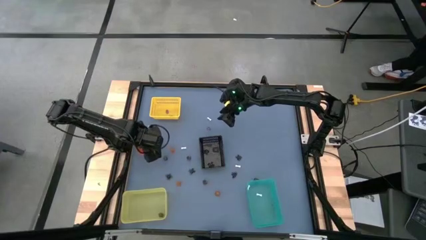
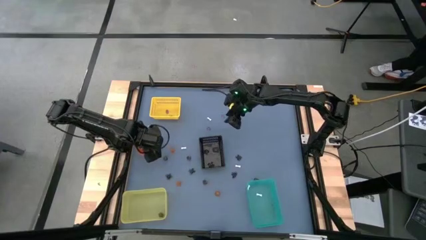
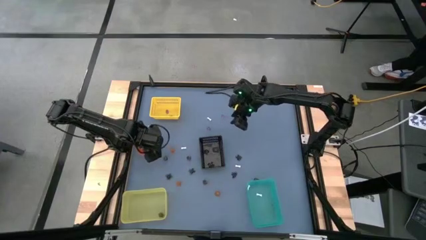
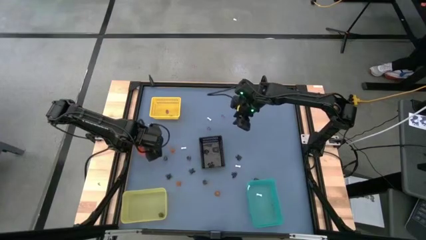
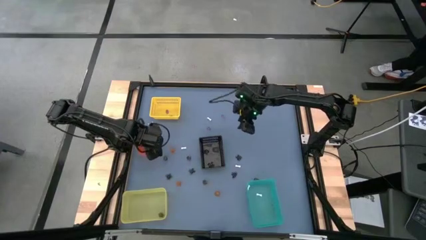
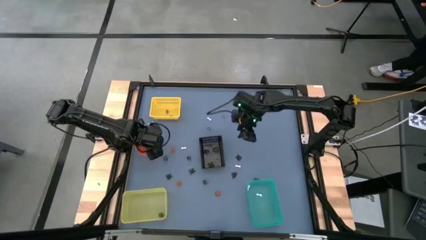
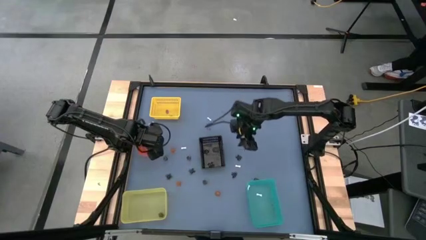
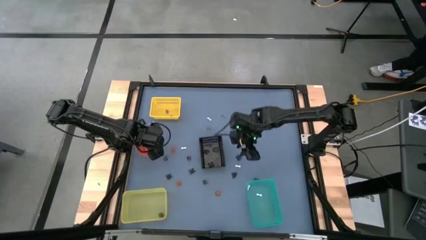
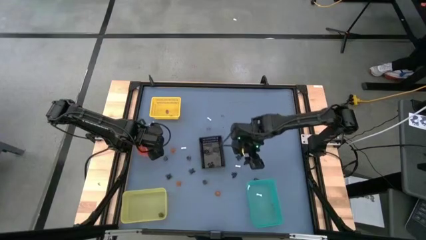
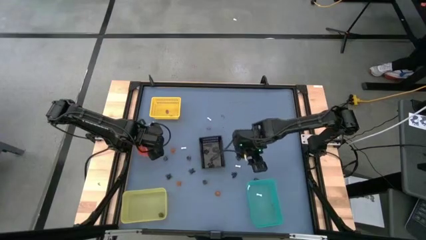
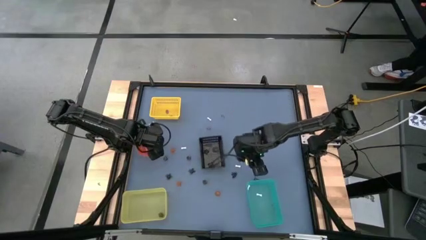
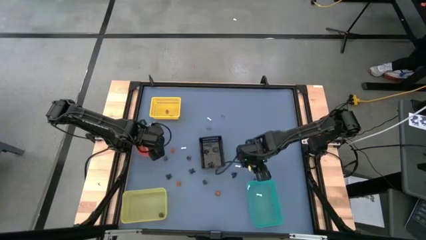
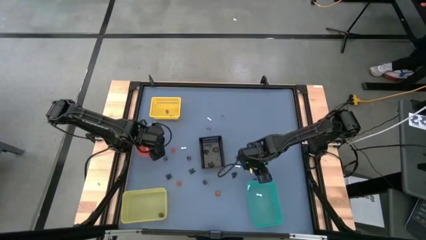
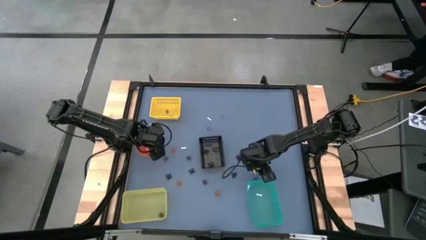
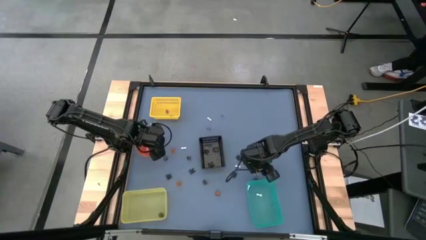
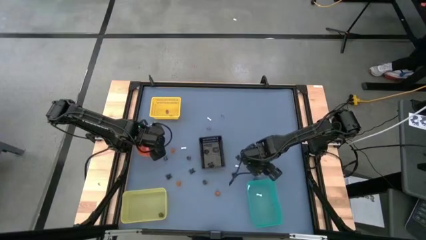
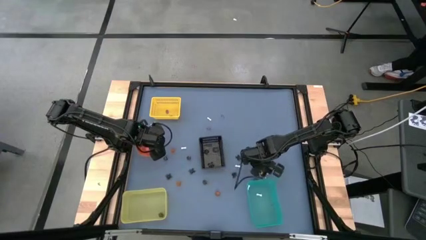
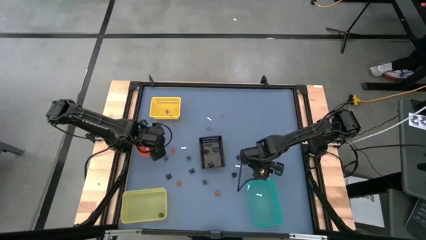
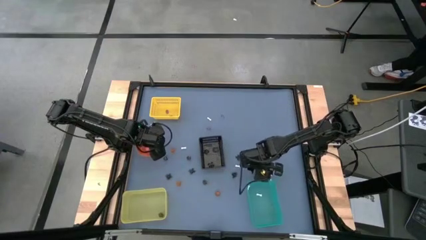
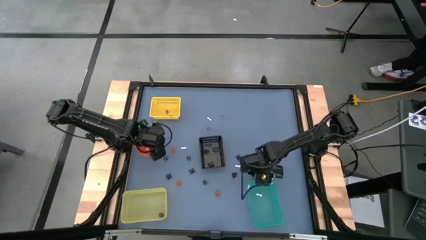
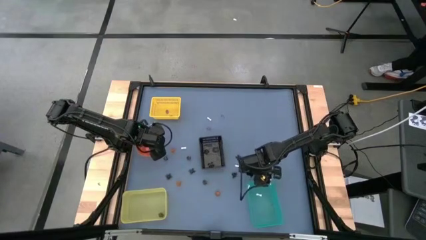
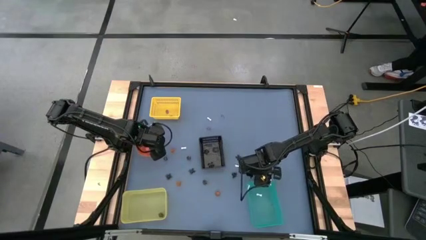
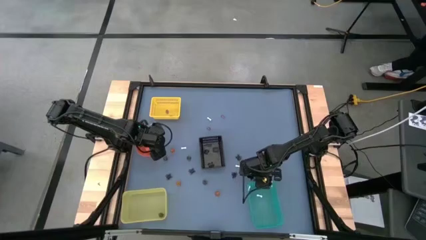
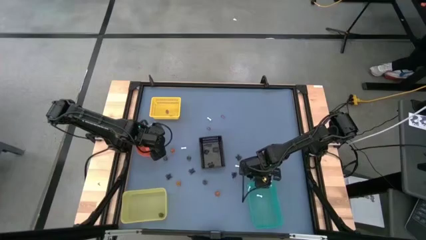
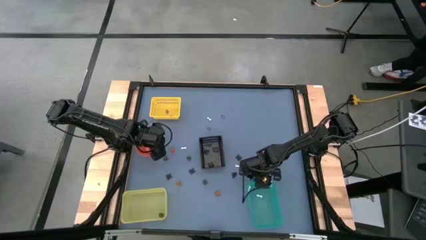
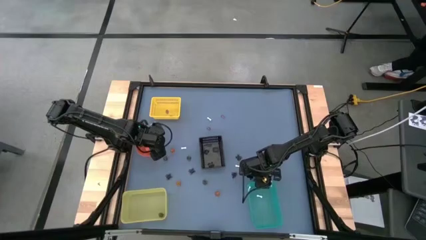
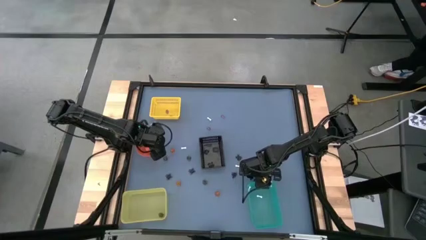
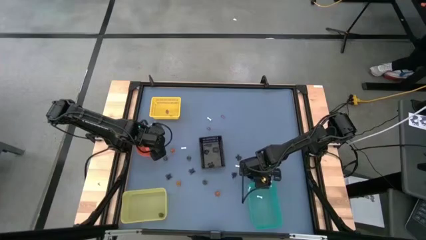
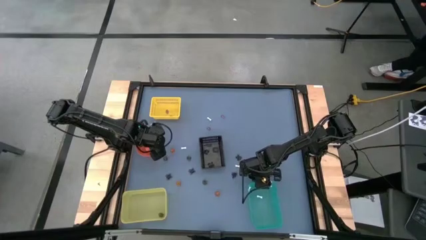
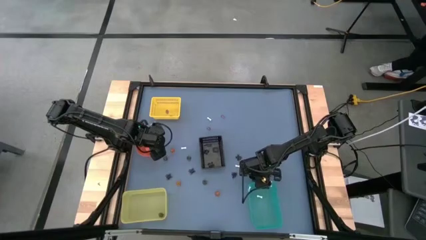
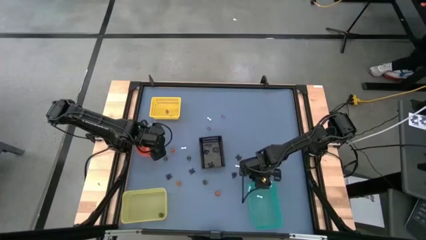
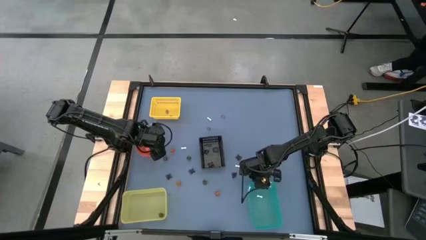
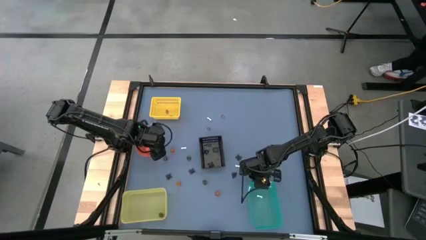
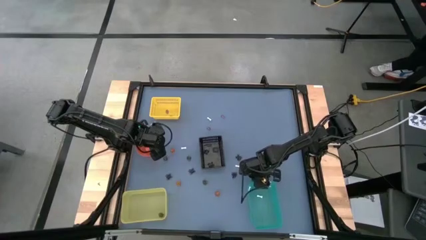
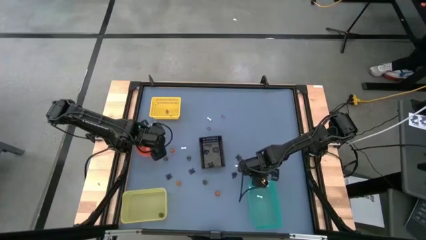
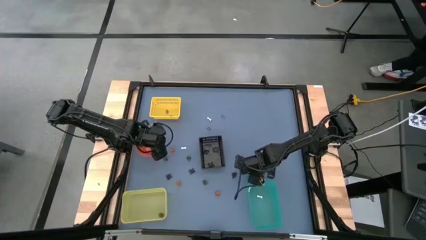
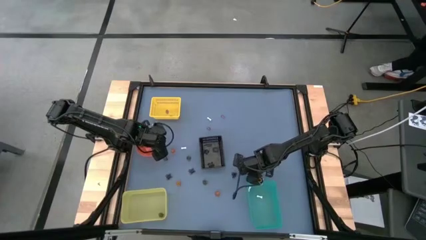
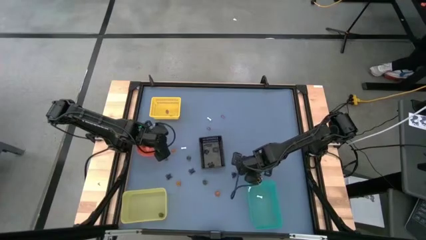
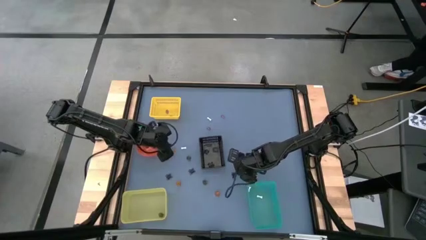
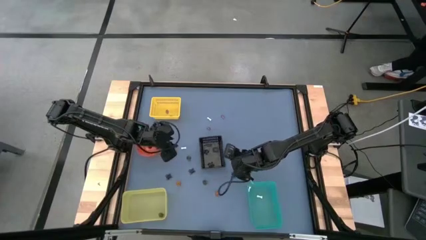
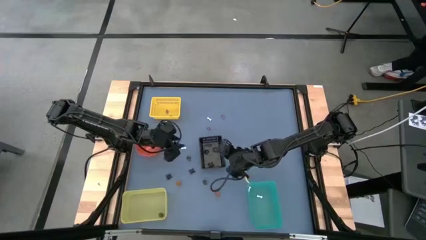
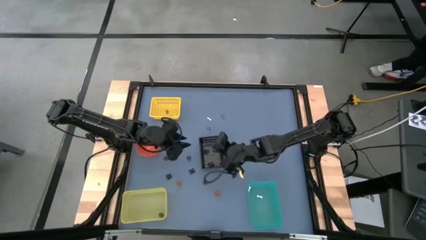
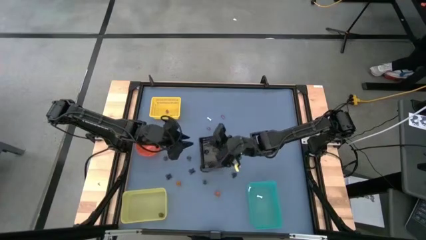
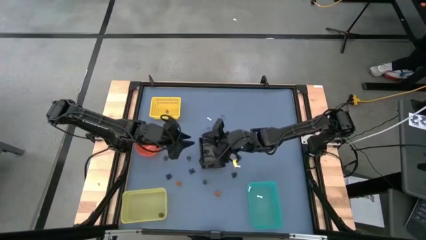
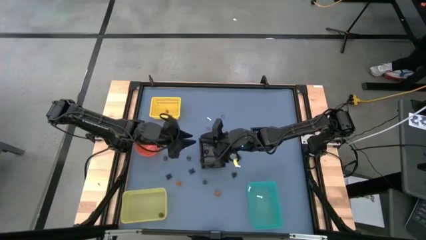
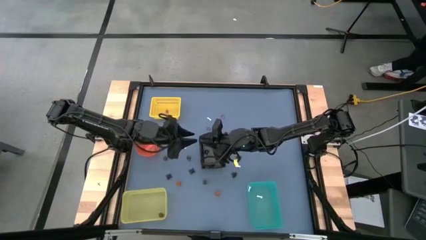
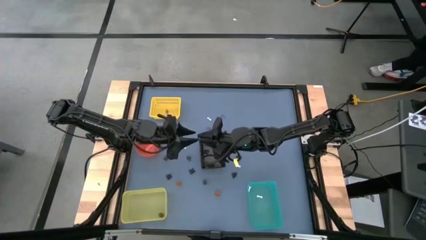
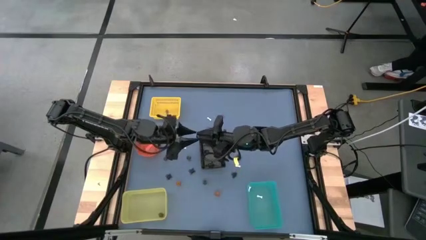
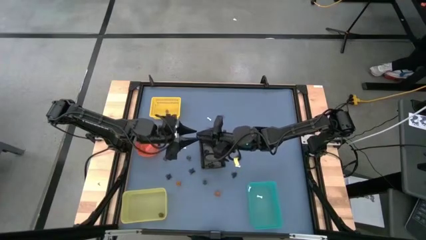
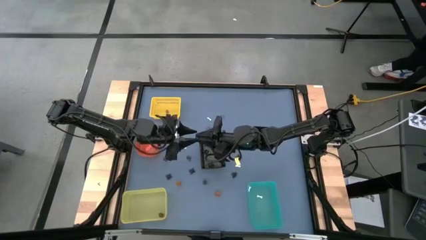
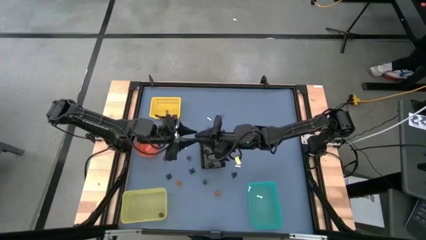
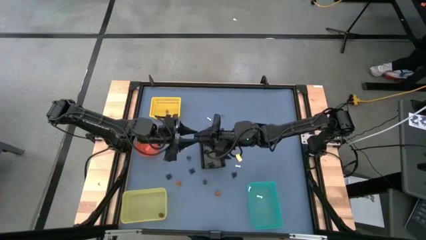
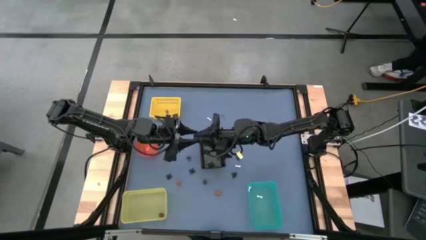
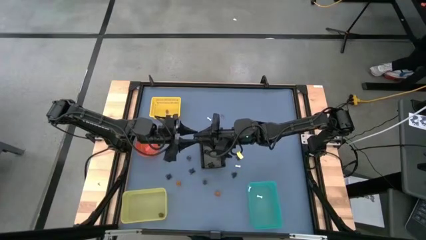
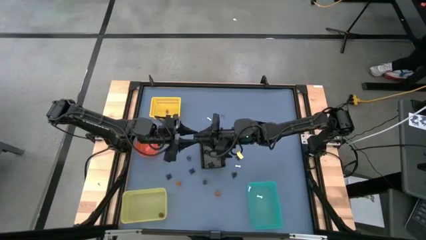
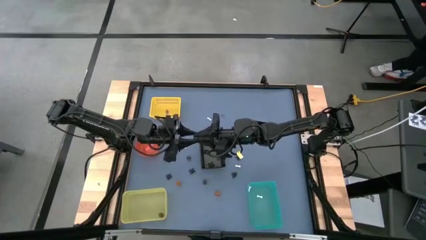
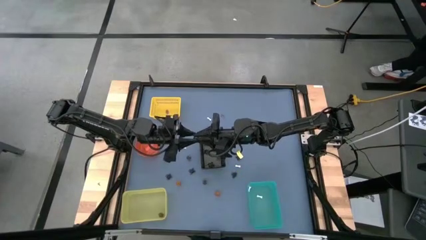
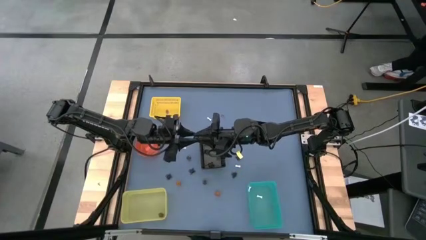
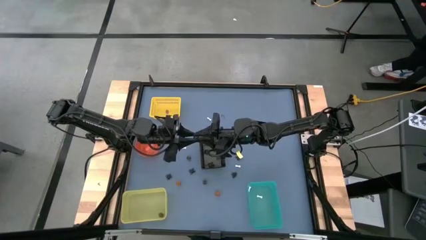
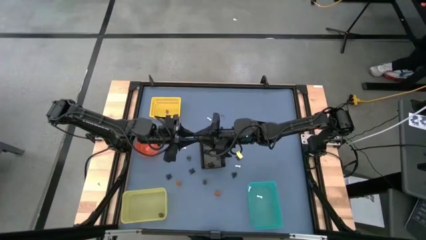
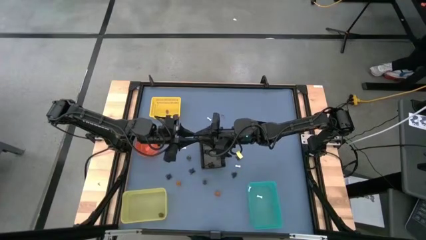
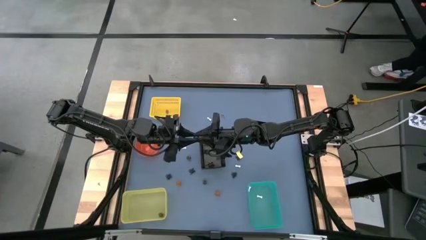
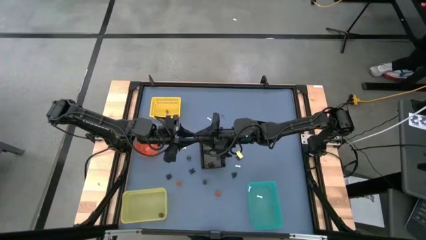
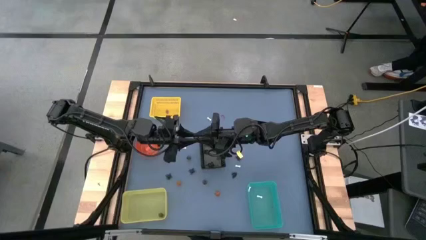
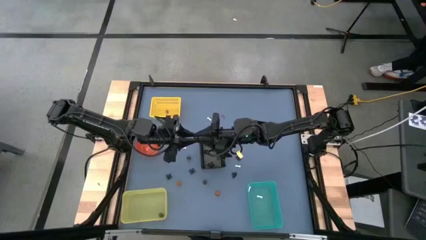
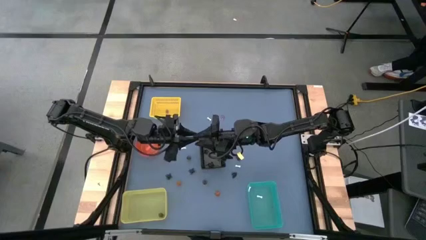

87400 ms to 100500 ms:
Task: Sort Halloween decoration
Put the black skull toy into the bottom yellow bin
